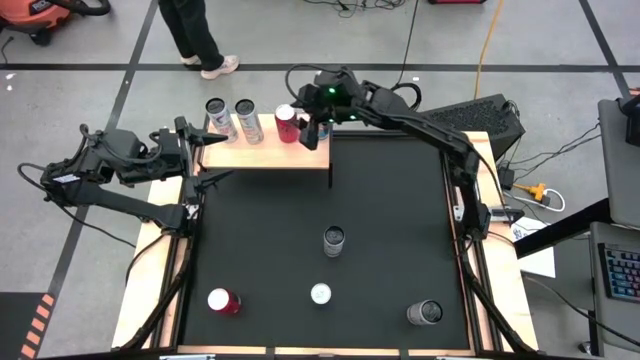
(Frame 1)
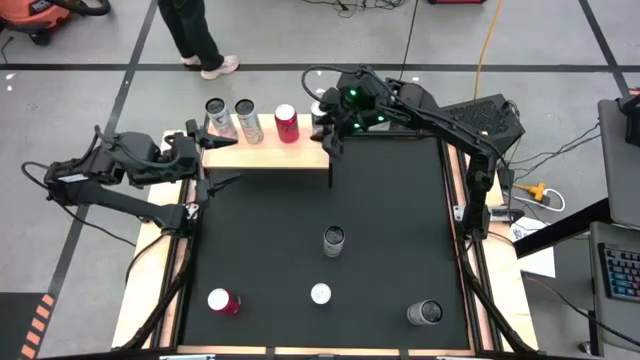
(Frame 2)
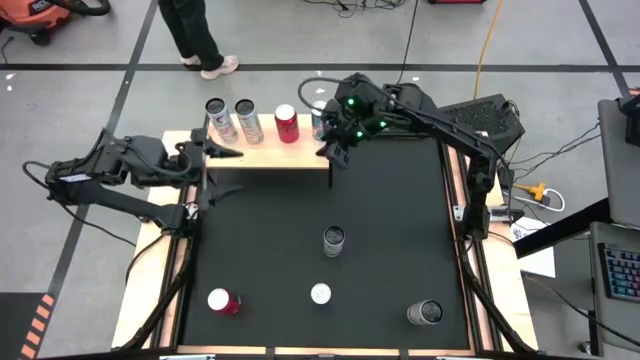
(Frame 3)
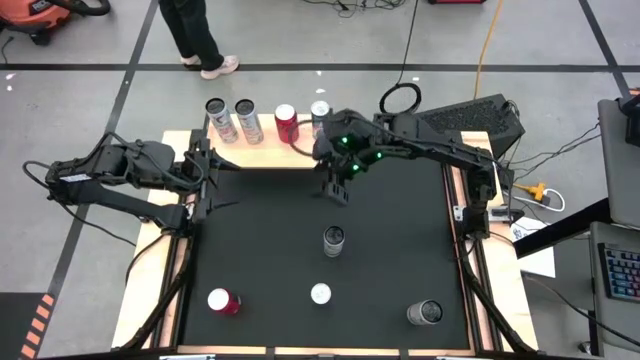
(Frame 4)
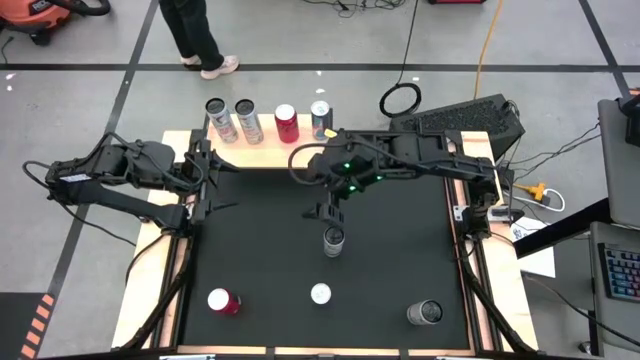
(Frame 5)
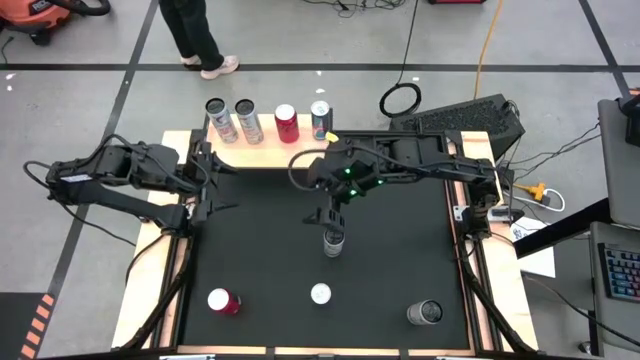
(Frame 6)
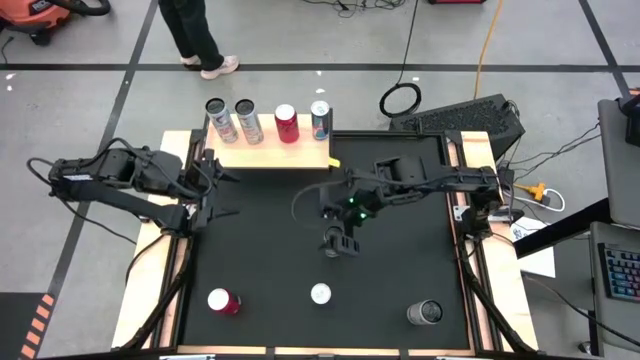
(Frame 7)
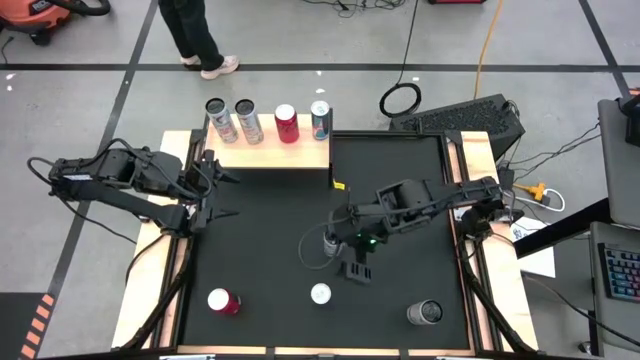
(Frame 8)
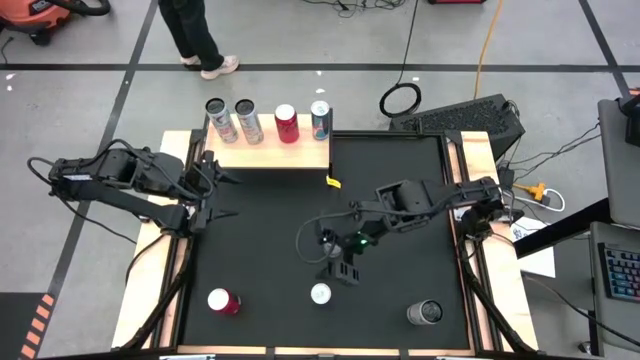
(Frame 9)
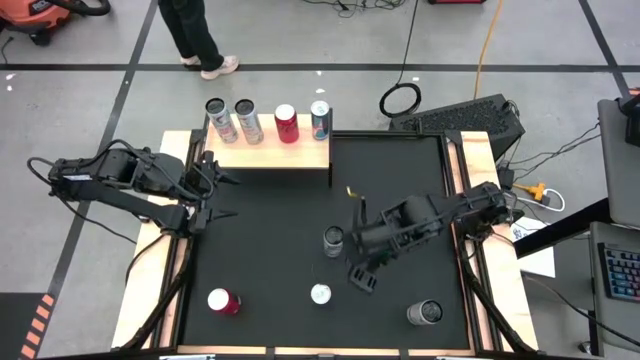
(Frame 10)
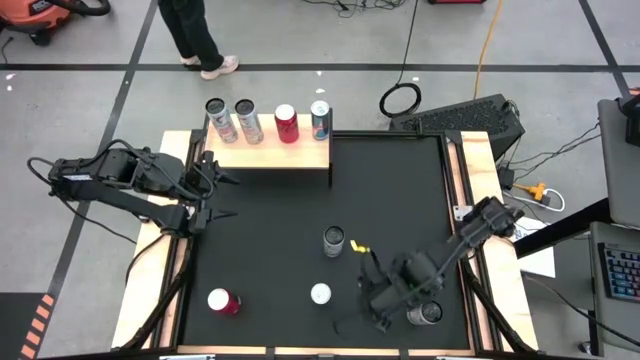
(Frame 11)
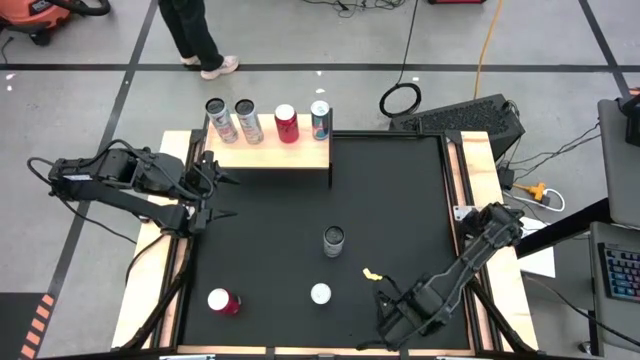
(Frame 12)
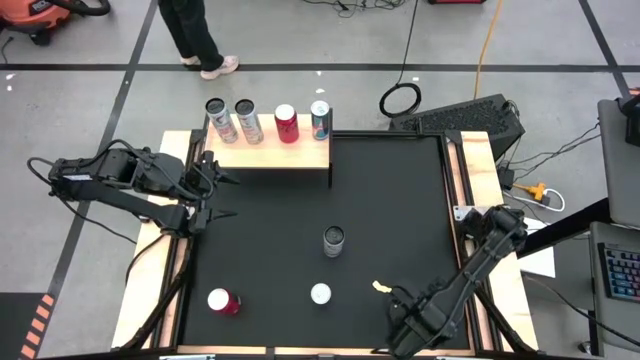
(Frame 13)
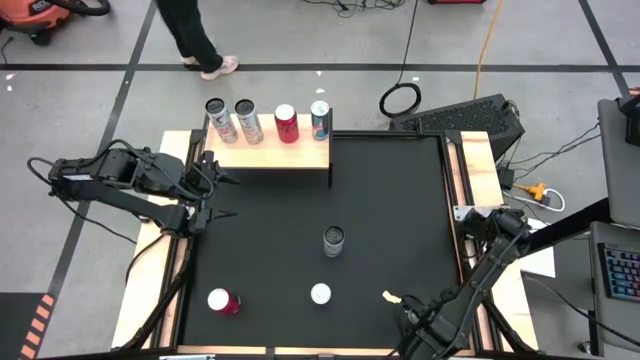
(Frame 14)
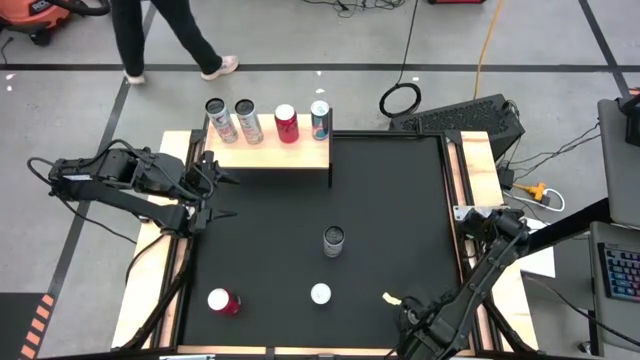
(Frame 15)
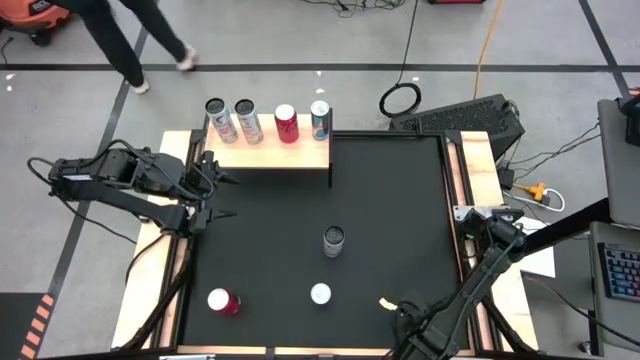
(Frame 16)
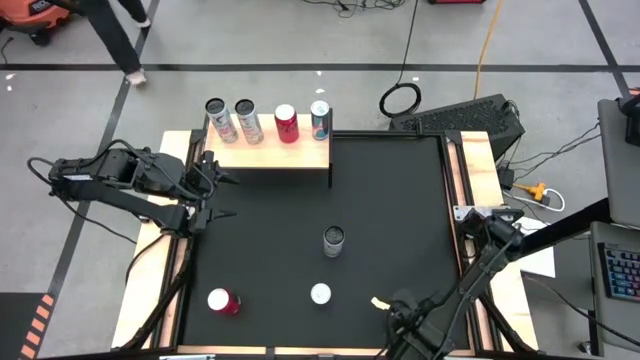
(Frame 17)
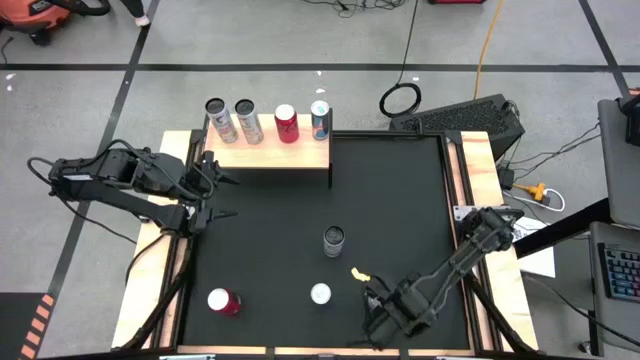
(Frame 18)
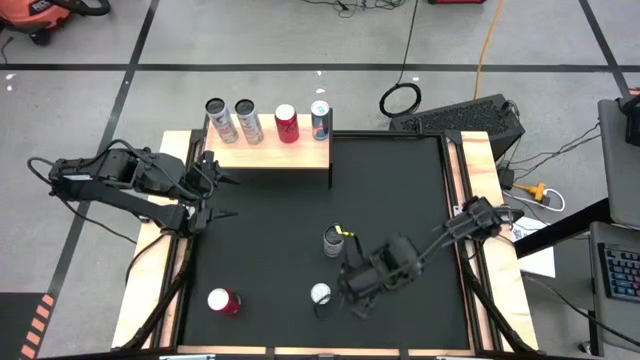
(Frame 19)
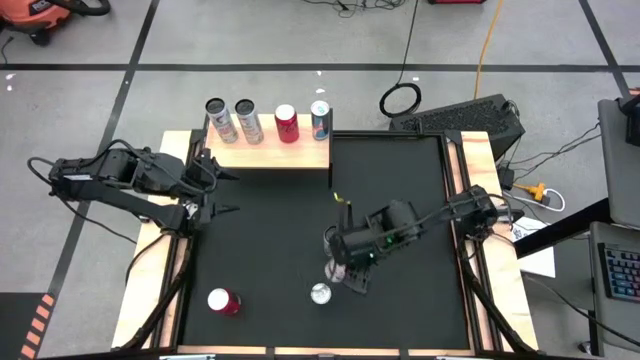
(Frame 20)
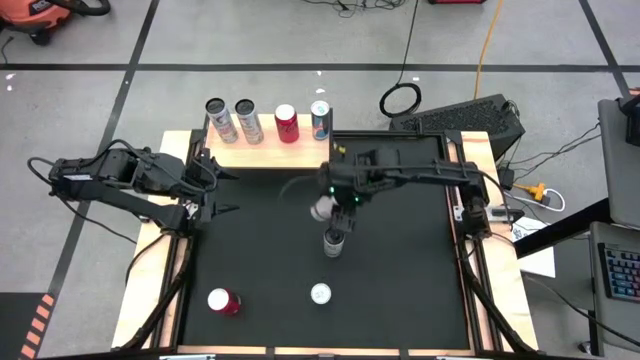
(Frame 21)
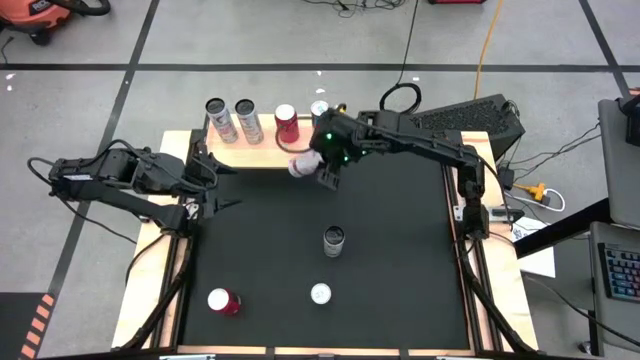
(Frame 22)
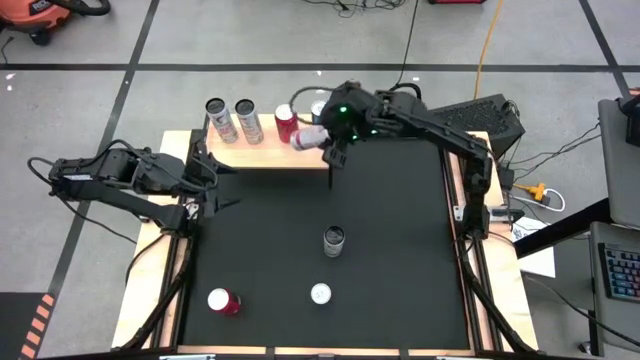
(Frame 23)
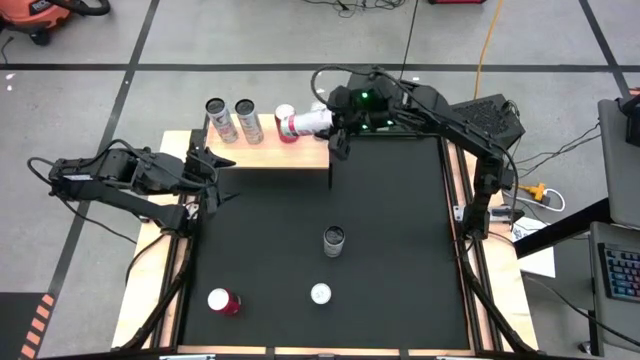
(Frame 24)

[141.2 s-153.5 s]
Task: Place canned beverage on shelf
Put the white pink soda can aligned with the white pink soda can on the shelf

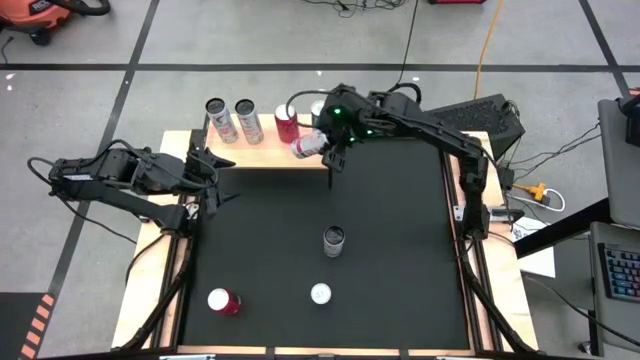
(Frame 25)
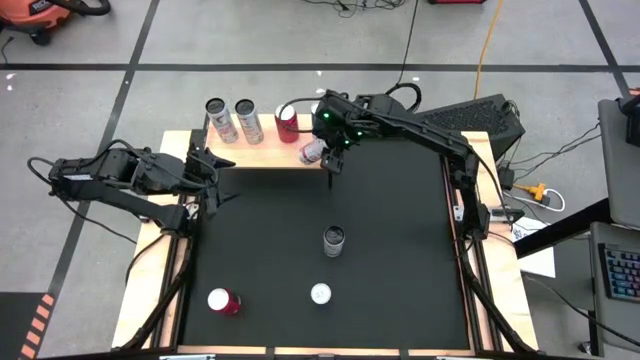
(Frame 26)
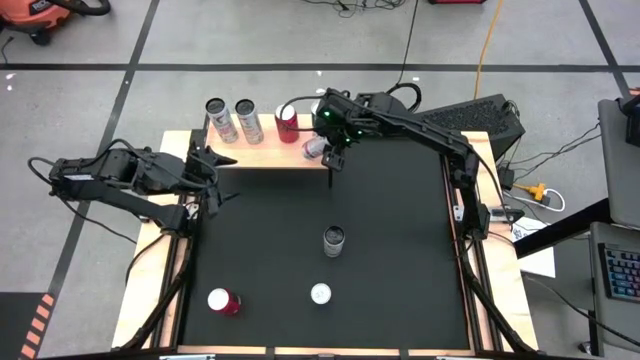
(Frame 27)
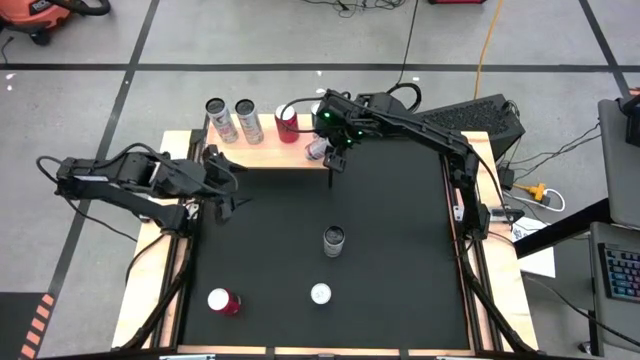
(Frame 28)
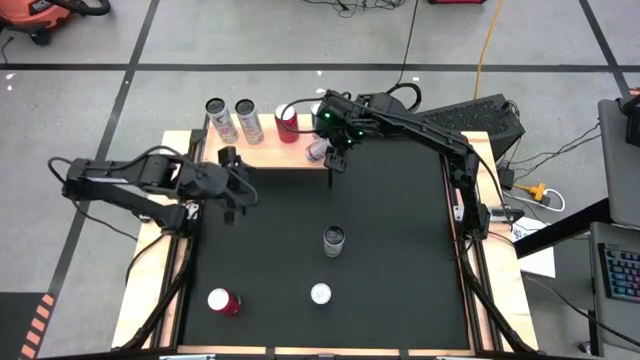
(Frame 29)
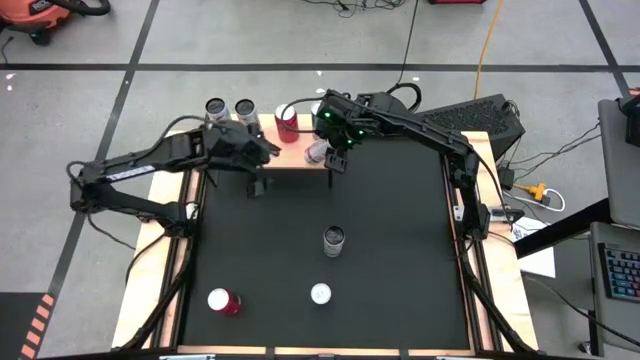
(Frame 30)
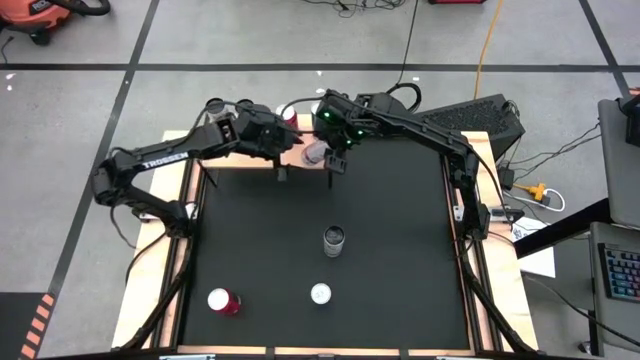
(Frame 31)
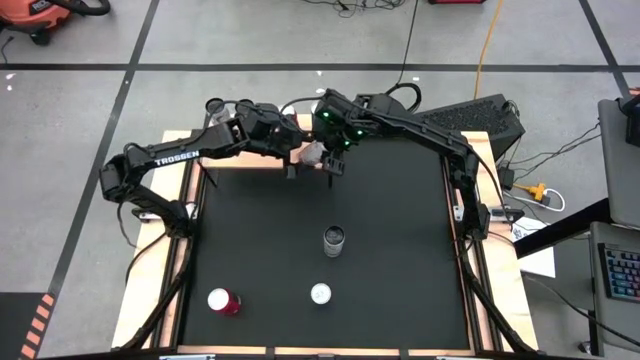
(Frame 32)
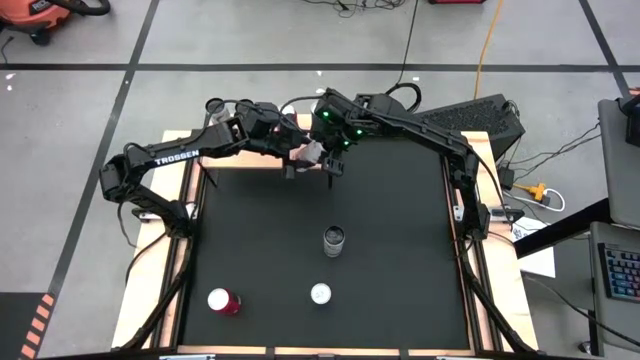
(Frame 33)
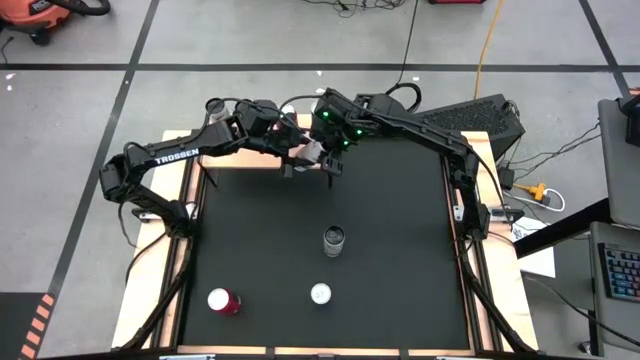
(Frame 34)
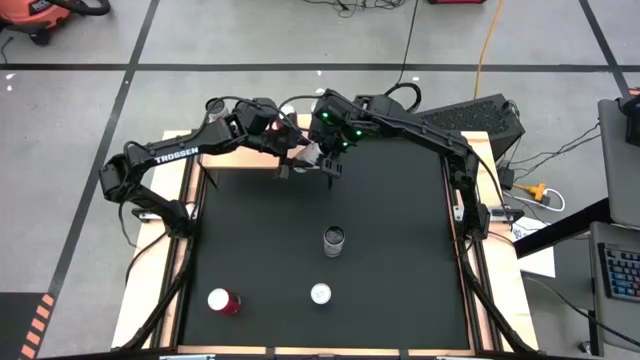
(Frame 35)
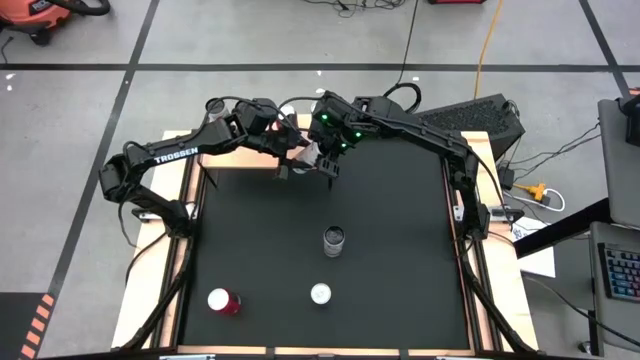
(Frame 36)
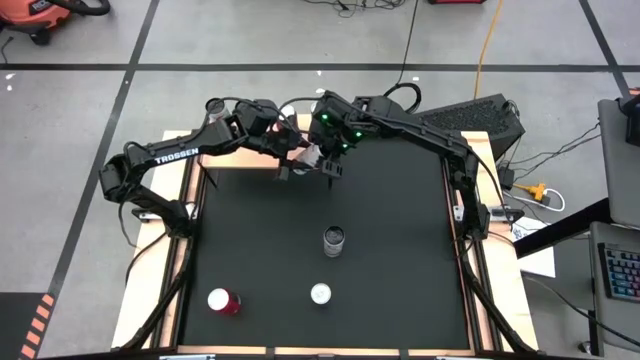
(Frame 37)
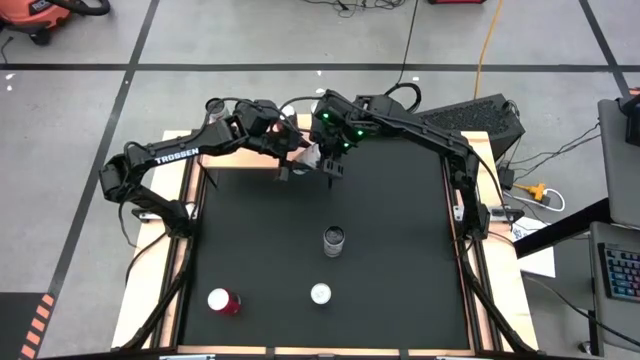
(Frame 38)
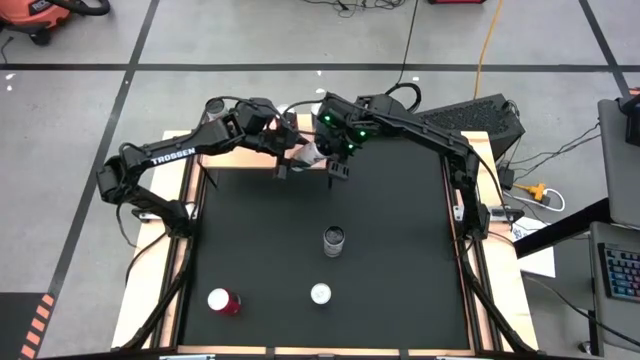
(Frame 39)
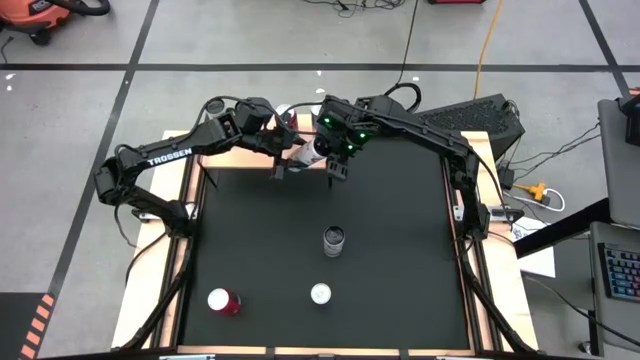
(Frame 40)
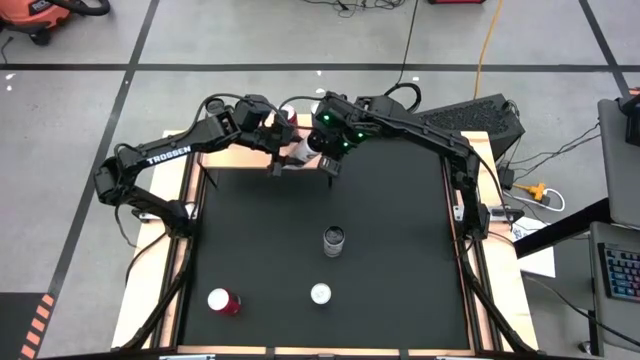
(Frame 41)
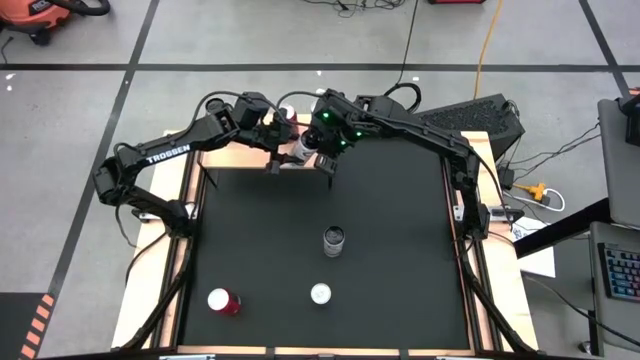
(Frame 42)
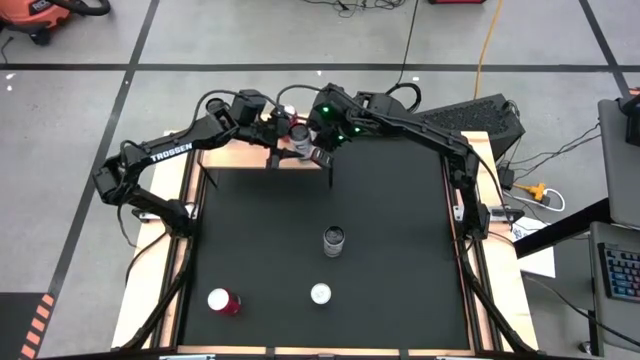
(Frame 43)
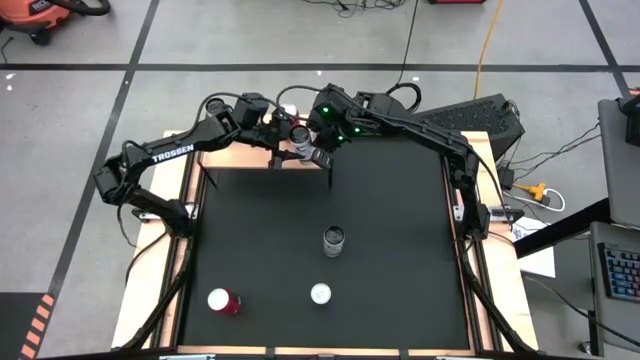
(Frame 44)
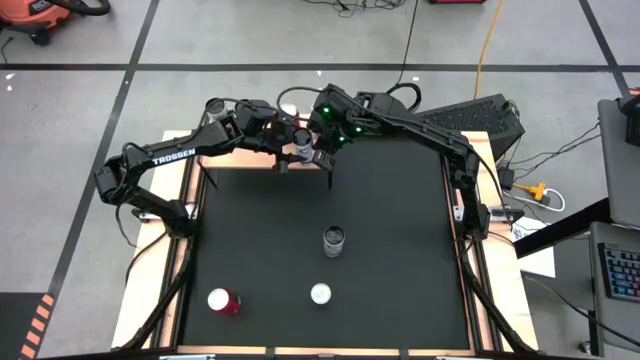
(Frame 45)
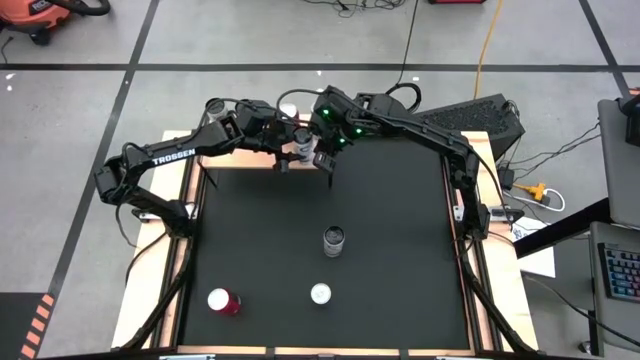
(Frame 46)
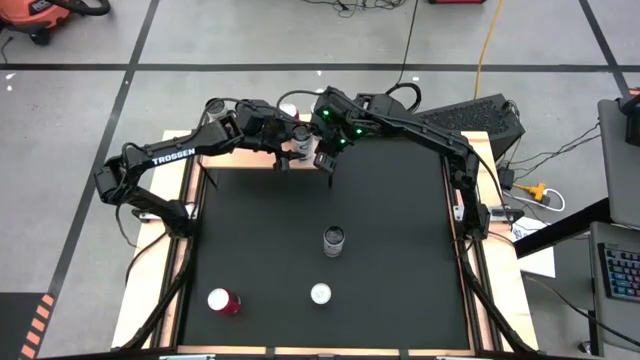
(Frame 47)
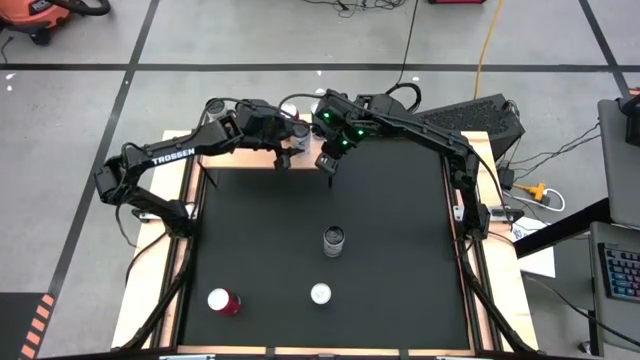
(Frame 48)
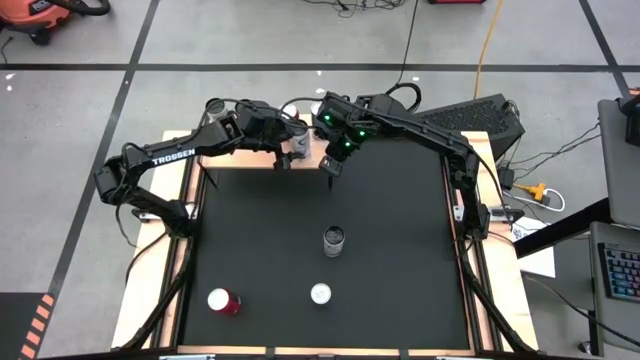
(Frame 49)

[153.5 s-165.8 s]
Put the white pink soda can aligned with the white pink soda can on the shelf
